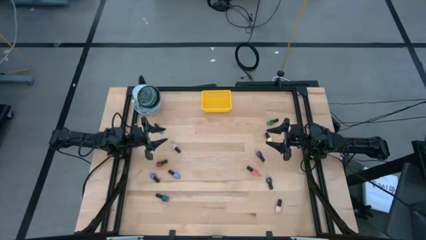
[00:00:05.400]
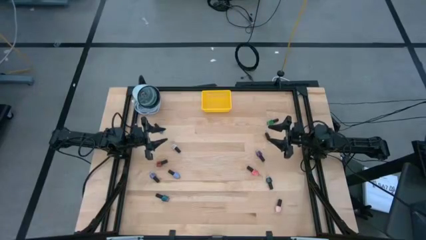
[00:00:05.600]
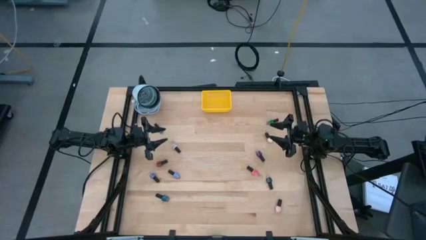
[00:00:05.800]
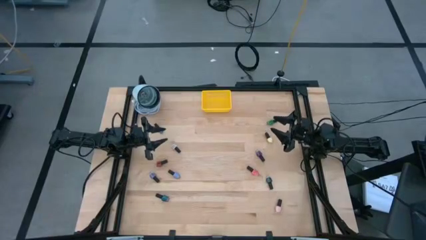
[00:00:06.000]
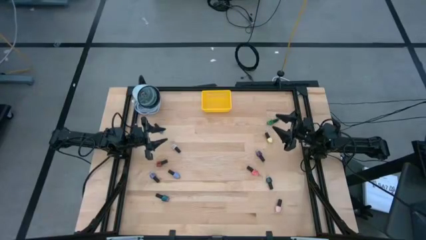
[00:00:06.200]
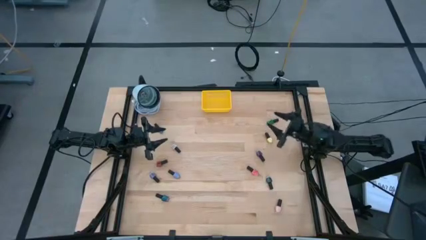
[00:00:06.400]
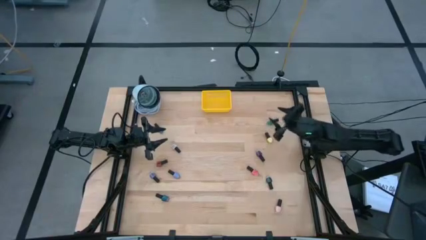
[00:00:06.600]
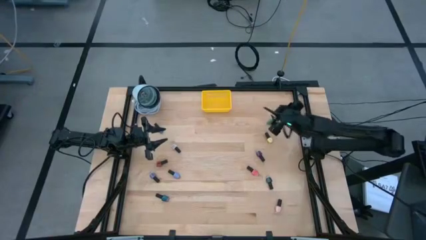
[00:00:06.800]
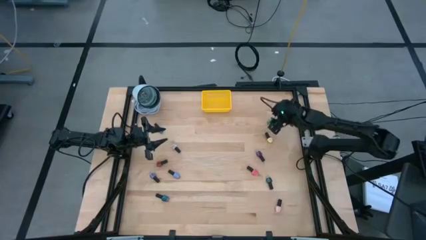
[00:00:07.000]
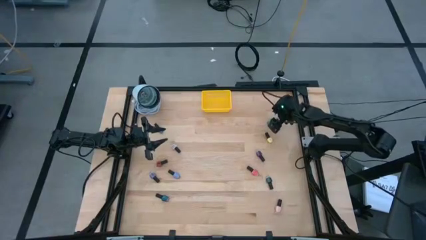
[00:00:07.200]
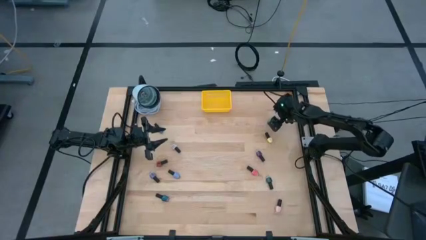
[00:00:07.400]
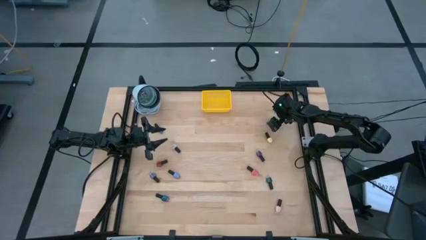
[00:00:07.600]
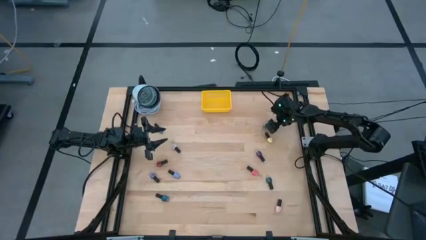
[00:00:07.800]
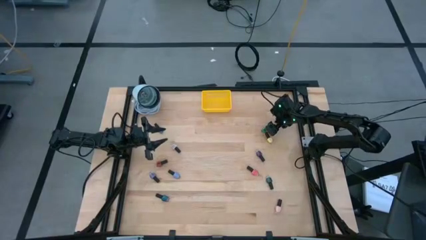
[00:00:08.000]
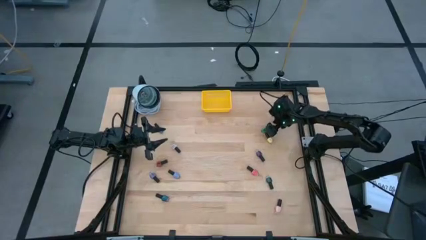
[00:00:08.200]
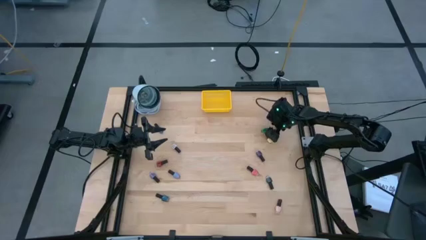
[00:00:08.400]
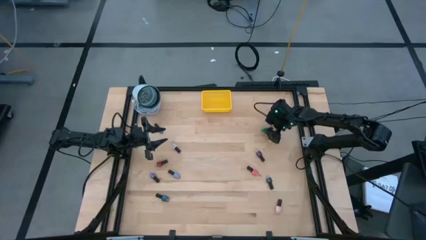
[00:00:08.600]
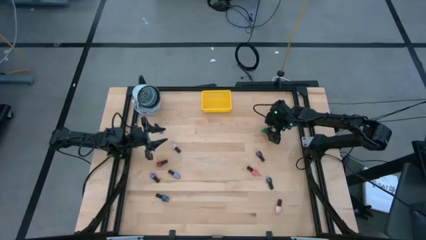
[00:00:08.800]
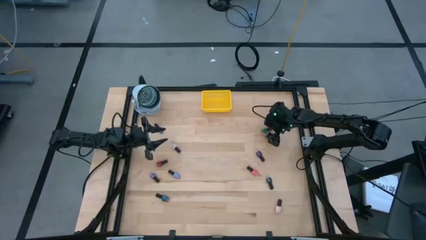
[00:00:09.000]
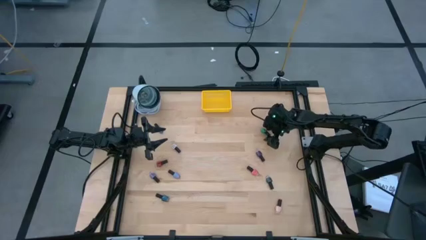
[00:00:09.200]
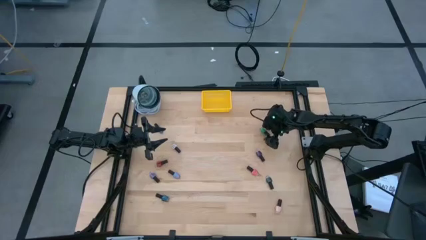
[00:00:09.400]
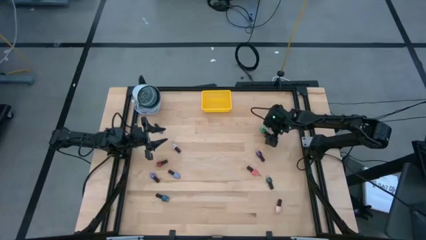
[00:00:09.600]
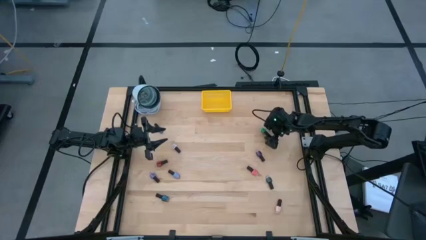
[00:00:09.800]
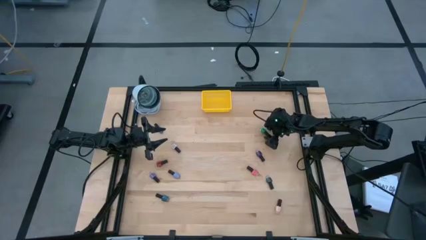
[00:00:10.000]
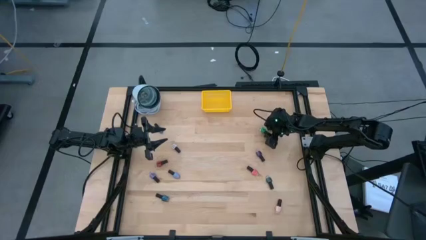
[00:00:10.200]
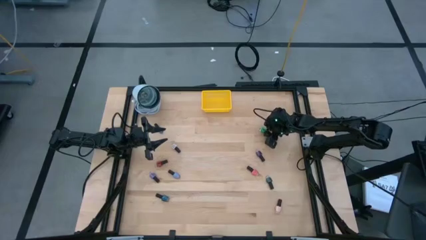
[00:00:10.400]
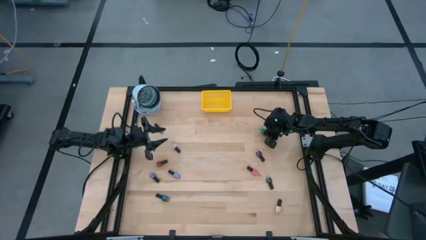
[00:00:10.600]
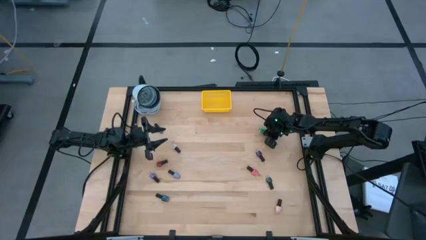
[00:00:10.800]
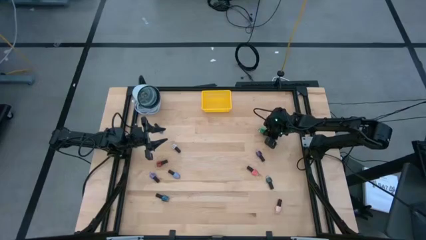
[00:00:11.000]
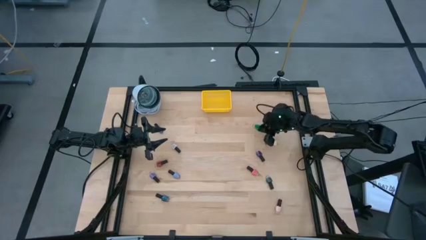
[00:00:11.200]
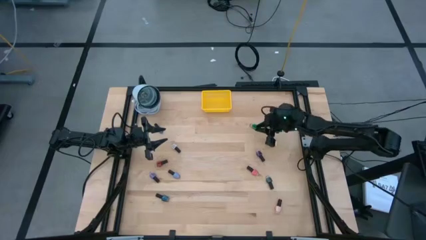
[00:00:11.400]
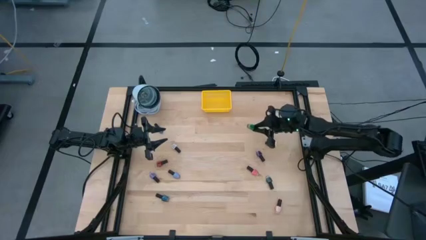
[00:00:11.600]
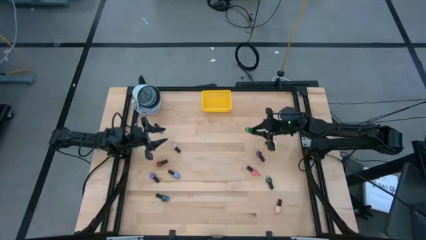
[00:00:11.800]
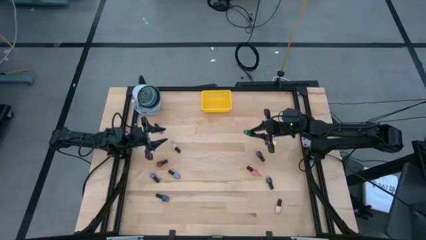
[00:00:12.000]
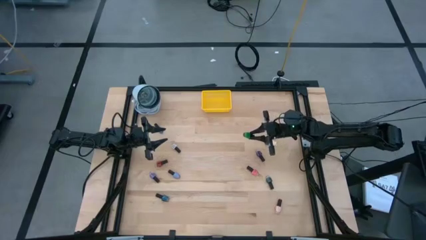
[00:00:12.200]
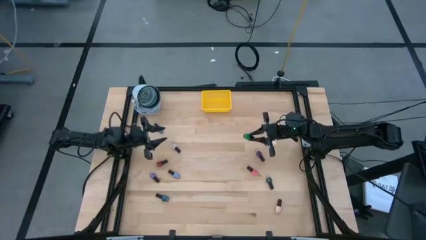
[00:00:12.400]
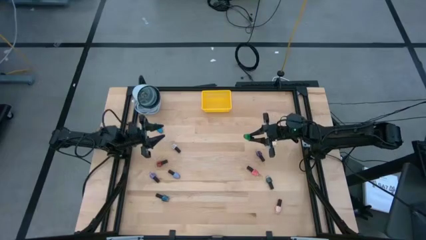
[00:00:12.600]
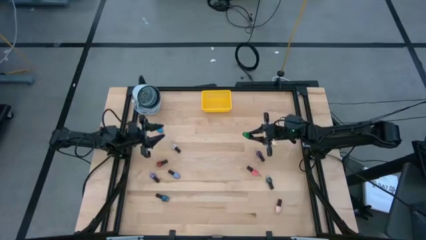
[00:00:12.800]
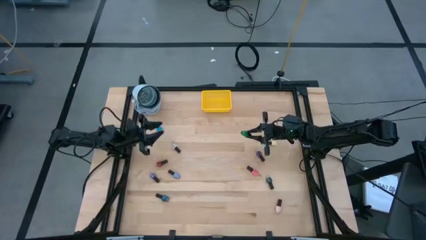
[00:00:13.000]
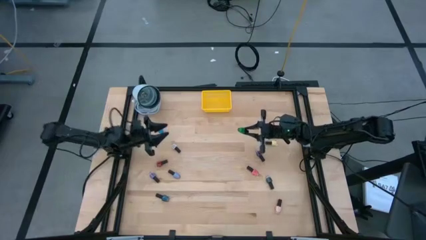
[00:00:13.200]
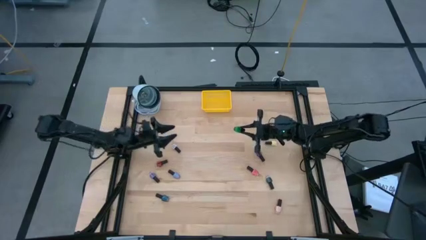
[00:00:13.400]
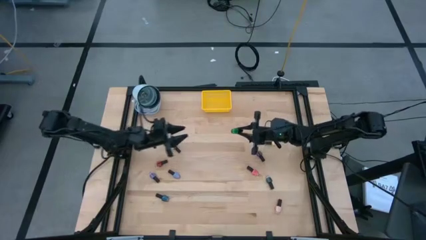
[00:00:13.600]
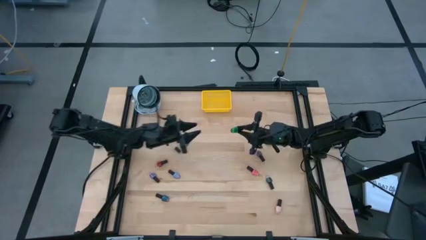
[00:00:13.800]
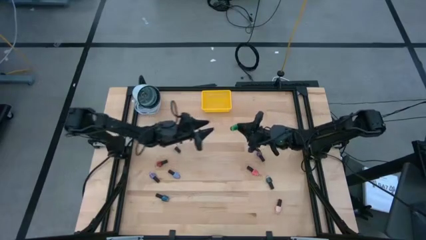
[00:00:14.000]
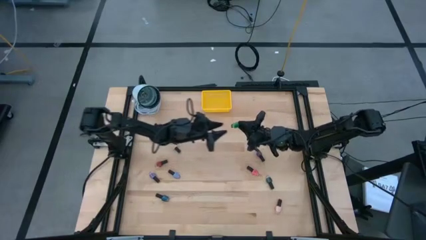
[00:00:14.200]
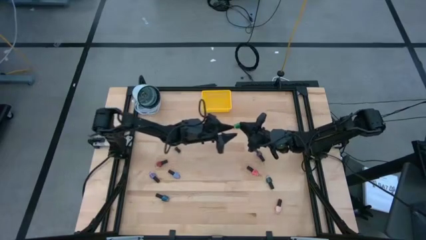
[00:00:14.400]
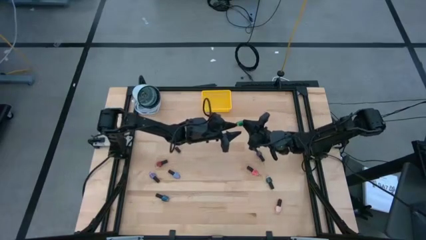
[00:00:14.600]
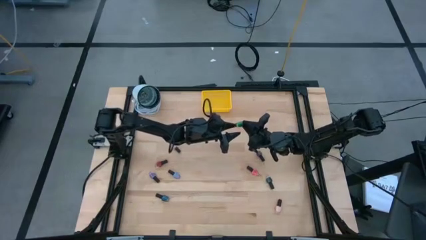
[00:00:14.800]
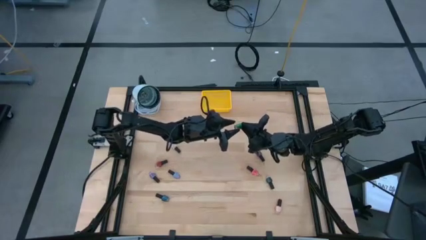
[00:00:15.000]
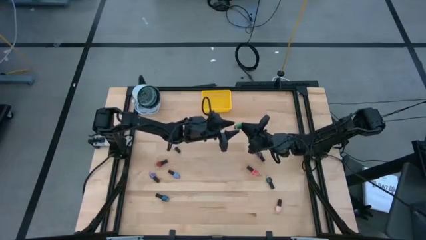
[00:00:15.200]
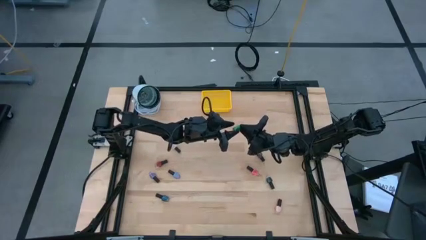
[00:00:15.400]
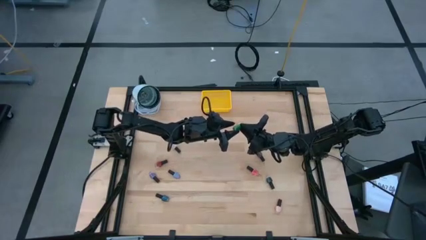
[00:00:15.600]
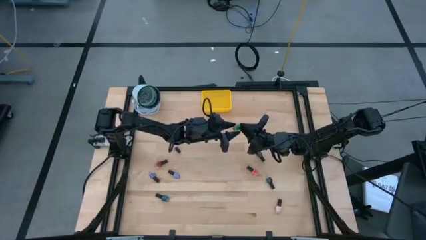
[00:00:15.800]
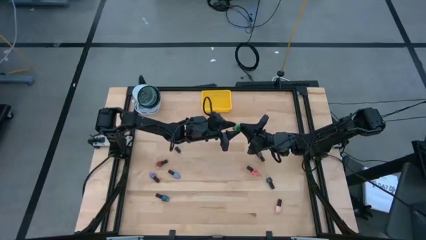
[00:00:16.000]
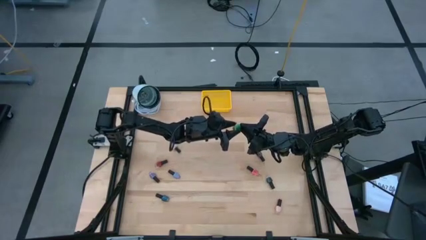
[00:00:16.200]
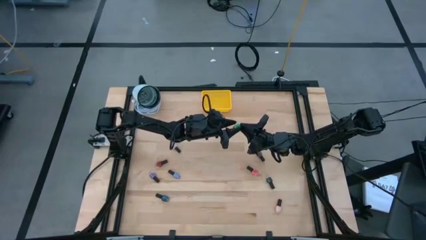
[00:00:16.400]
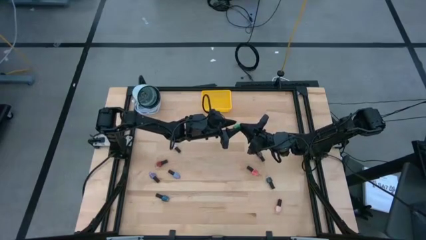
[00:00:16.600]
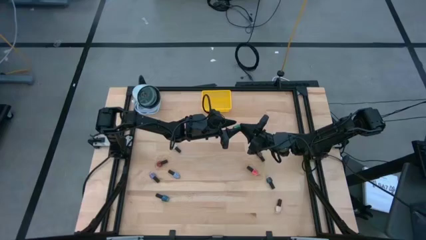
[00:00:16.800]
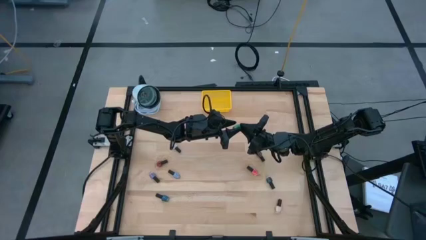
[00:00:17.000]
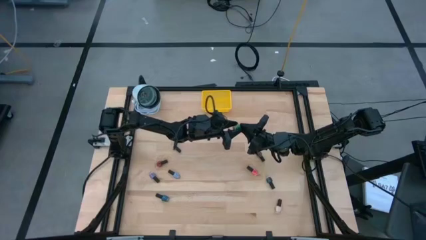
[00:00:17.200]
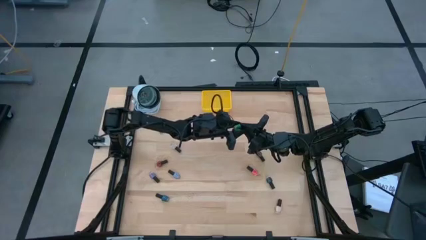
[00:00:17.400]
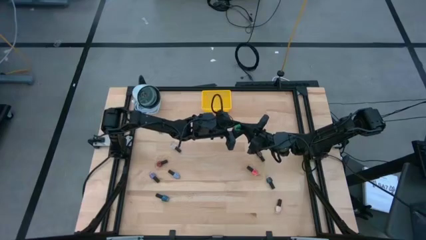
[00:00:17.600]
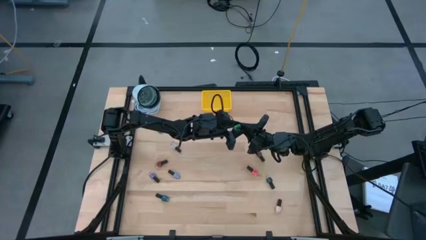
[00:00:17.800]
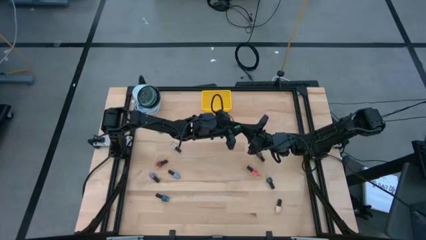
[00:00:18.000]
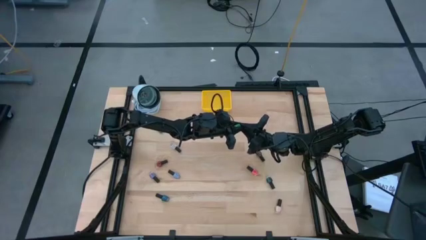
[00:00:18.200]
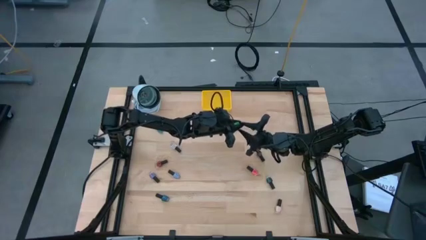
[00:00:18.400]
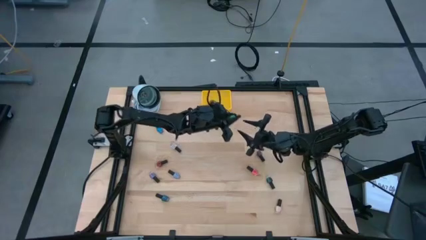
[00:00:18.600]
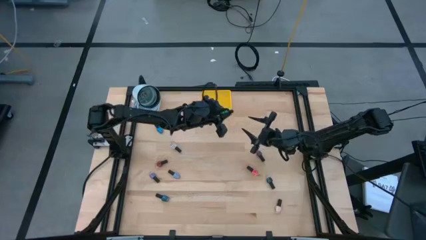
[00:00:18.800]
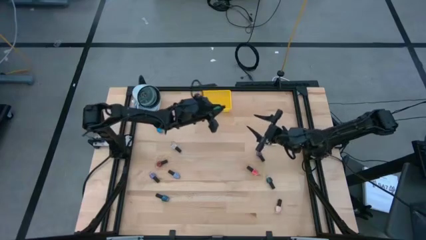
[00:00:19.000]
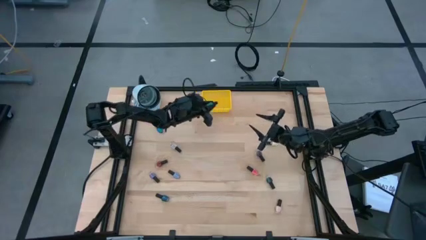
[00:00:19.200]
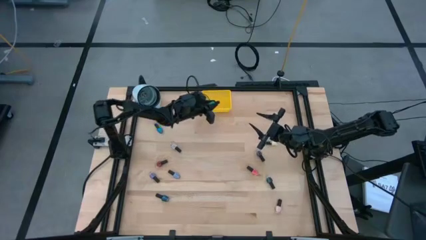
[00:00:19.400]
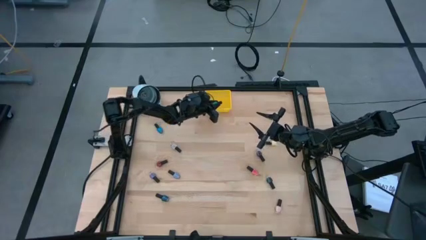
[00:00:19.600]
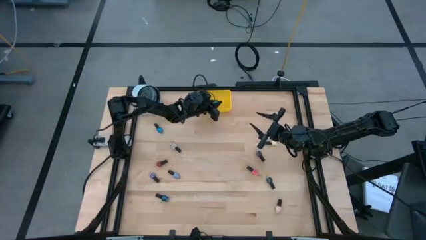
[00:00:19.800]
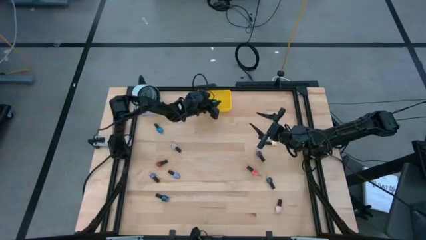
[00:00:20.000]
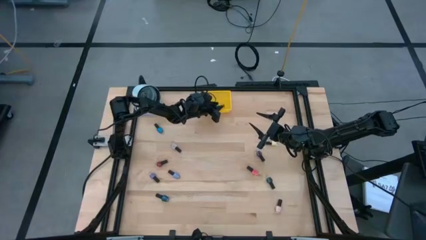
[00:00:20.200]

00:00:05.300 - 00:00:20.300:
Task: Pick & Place Nail Polish
Put the green nail polish bottle into the yellow bin
